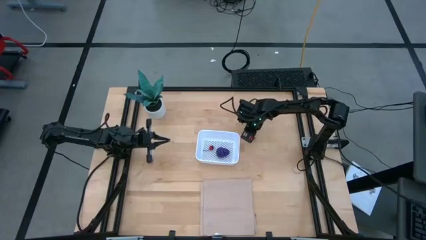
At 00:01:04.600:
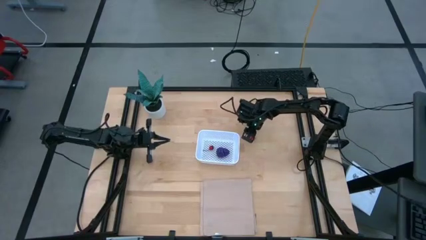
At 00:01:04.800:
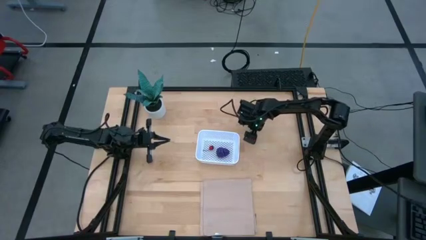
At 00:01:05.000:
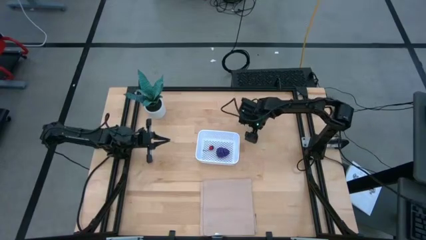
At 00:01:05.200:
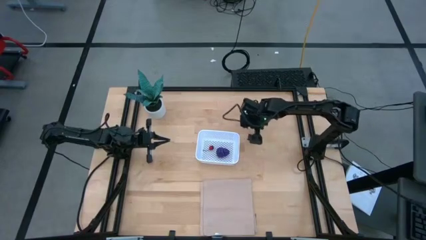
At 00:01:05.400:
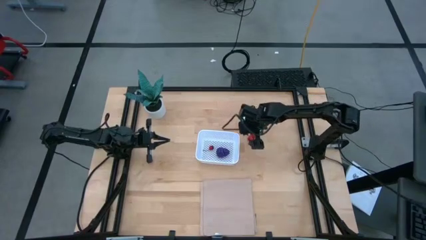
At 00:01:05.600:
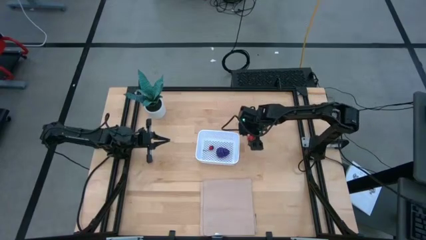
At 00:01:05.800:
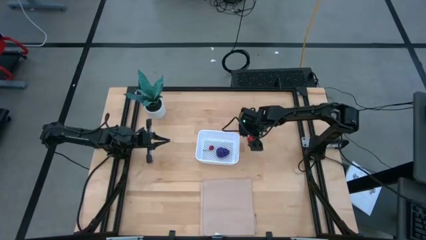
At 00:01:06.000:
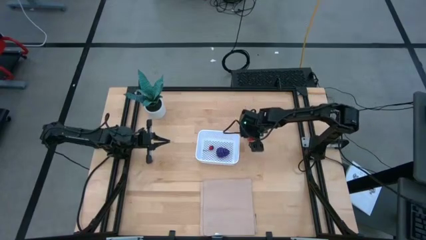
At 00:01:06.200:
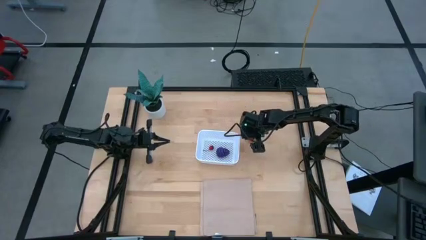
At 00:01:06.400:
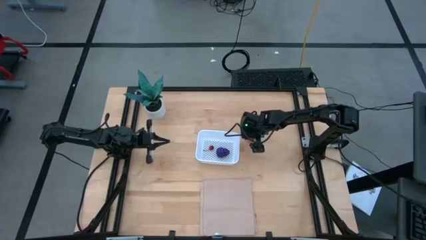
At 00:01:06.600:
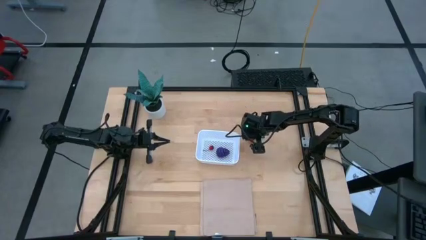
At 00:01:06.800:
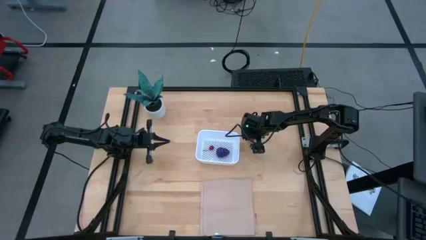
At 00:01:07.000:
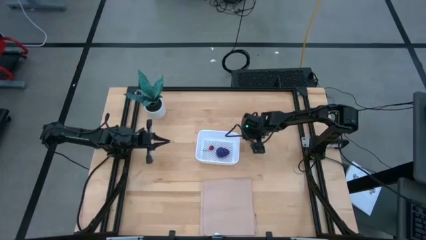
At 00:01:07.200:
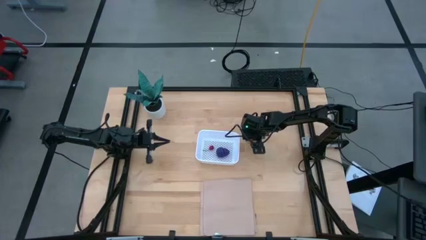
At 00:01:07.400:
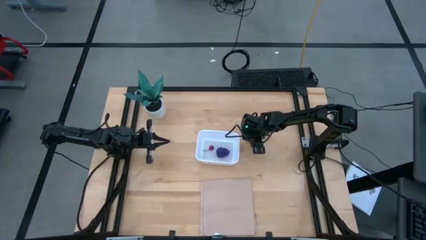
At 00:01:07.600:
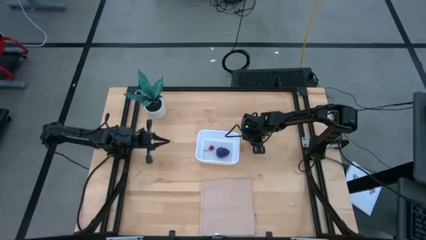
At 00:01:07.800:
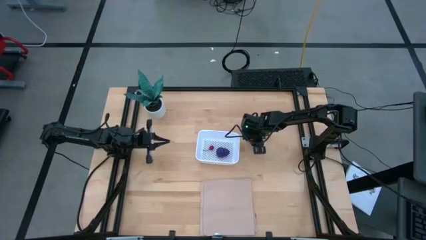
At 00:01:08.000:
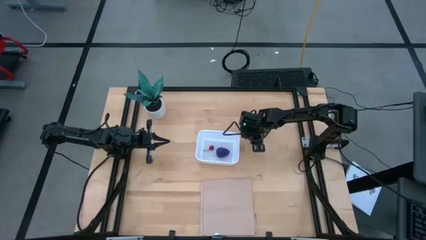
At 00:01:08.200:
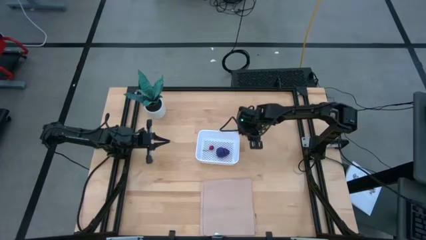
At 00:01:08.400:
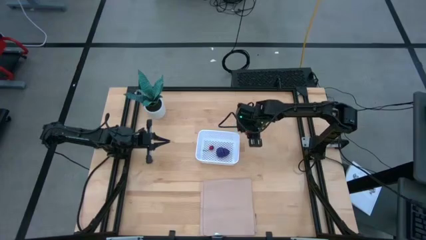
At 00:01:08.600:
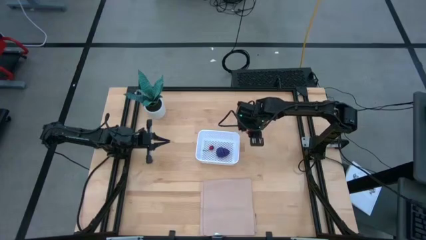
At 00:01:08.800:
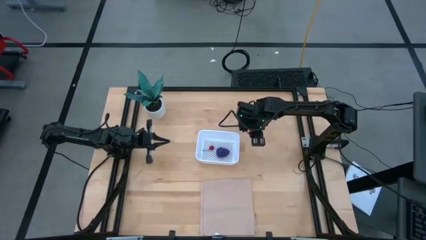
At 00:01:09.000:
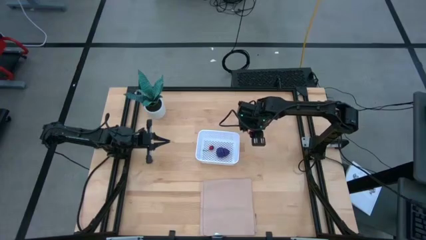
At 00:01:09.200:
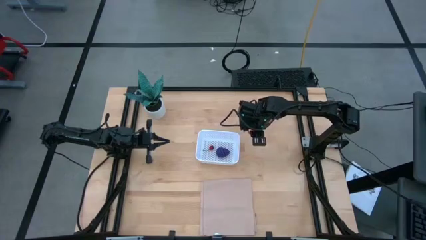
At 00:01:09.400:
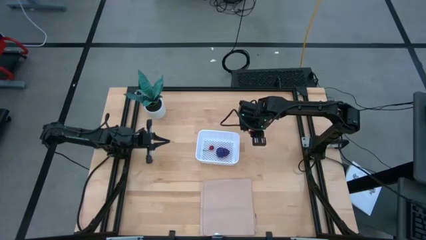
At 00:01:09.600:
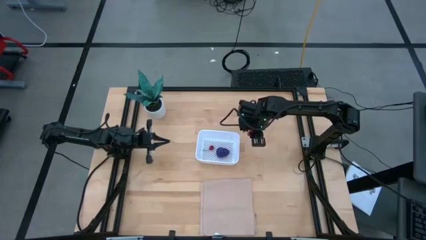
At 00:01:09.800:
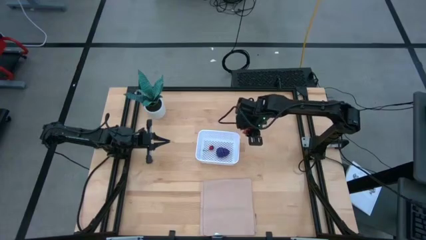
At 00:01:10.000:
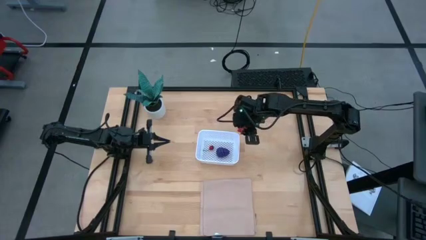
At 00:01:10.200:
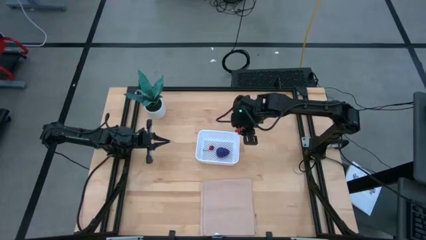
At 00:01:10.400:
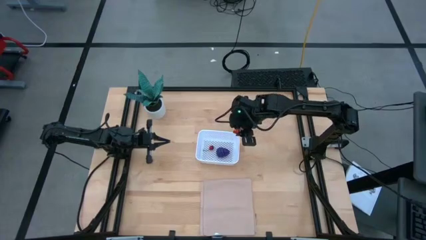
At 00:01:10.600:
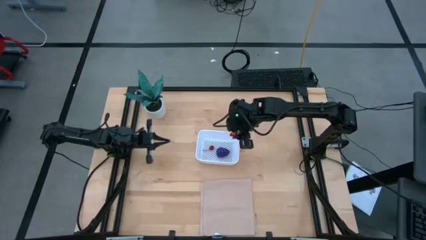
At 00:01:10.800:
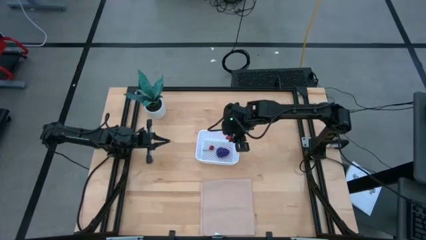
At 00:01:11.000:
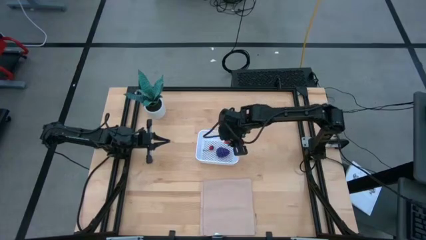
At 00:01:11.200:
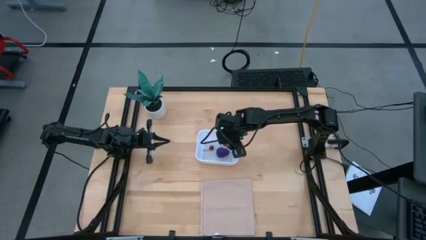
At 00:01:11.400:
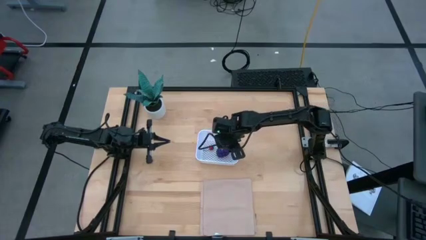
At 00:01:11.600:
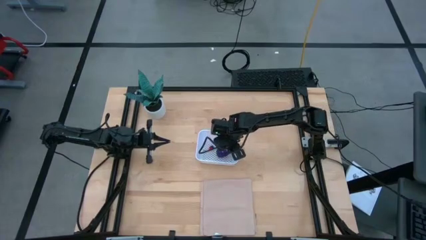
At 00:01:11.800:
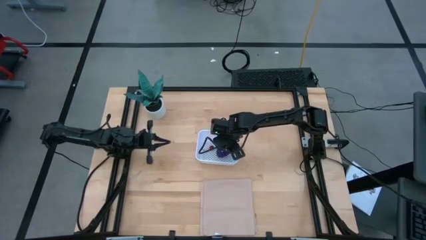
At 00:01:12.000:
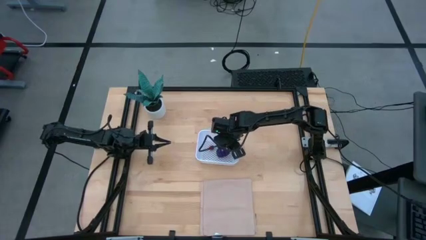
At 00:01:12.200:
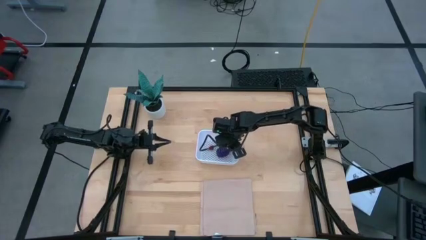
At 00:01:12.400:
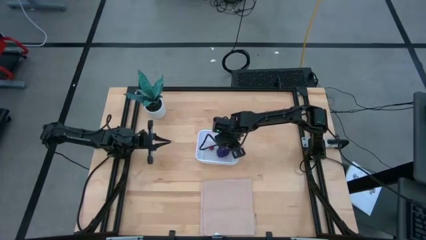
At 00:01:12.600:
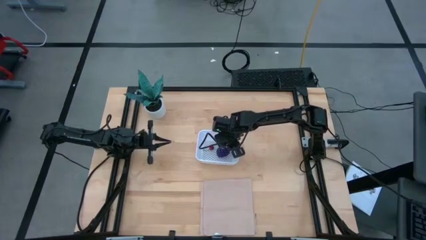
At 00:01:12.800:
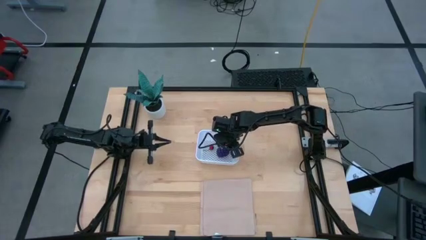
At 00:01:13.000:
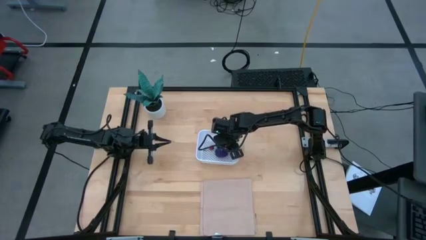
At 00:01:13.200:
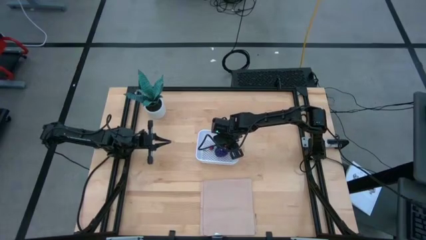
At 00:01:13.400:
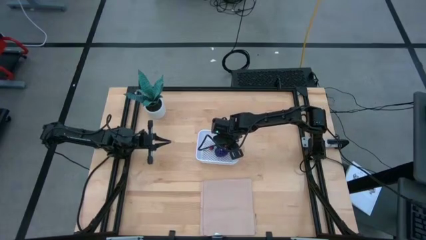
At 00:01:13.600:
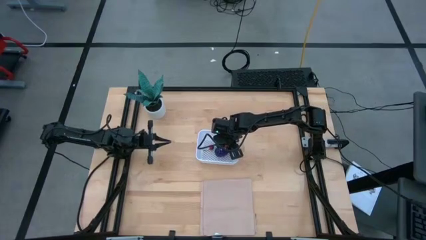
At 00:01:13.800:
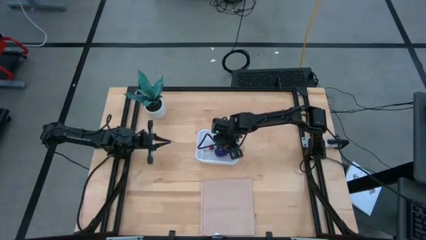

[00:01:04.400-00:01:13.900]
Task: Pick and placing Produce into tupperware
Put the red strawberry into the white bin

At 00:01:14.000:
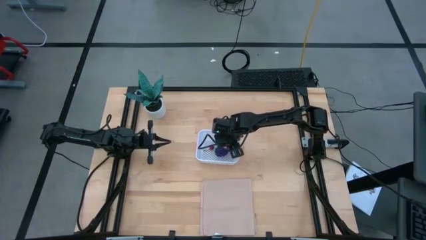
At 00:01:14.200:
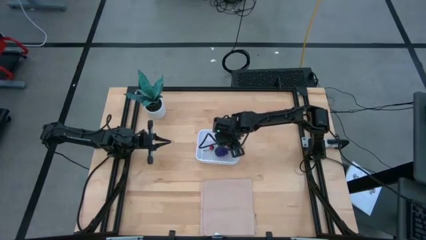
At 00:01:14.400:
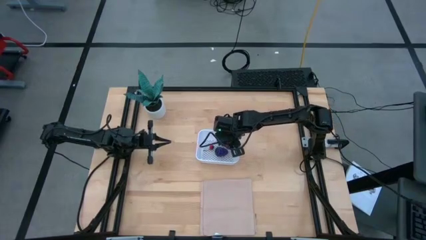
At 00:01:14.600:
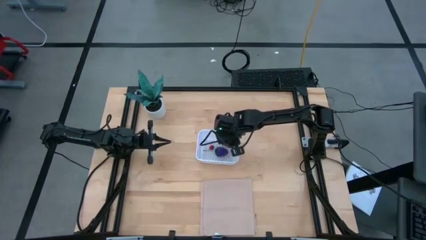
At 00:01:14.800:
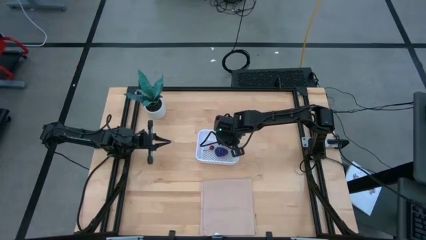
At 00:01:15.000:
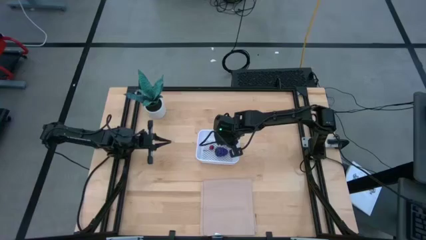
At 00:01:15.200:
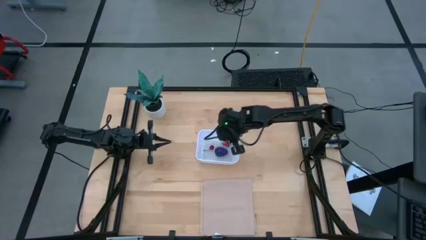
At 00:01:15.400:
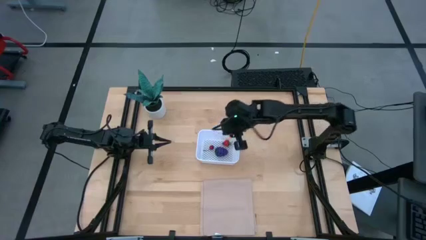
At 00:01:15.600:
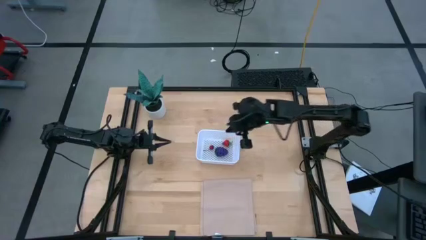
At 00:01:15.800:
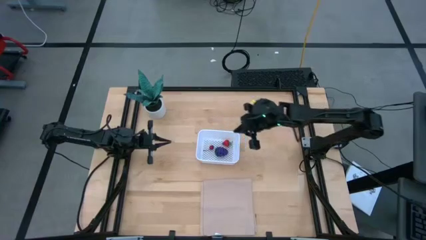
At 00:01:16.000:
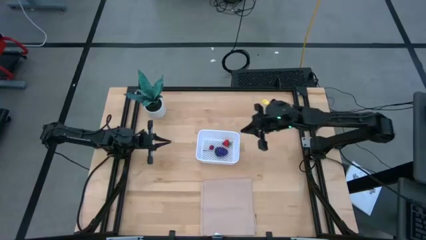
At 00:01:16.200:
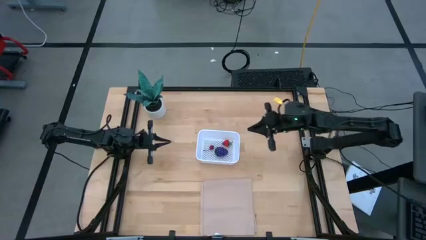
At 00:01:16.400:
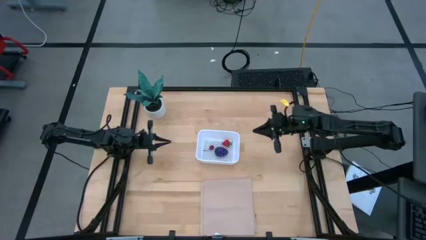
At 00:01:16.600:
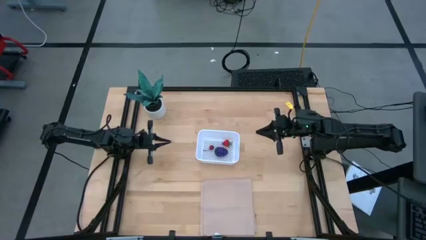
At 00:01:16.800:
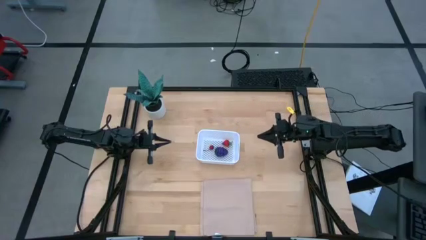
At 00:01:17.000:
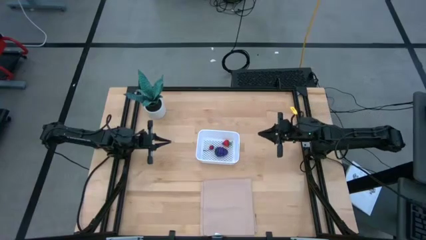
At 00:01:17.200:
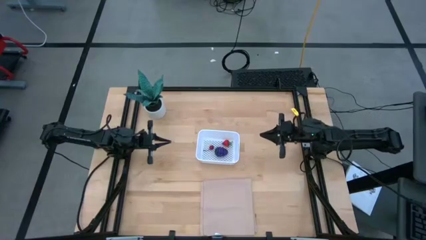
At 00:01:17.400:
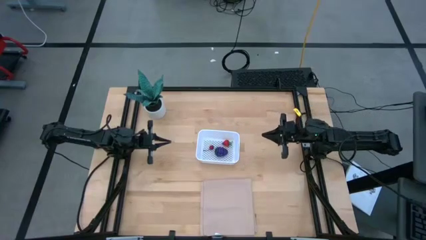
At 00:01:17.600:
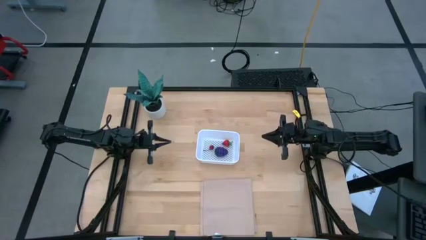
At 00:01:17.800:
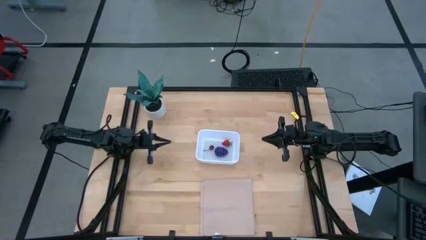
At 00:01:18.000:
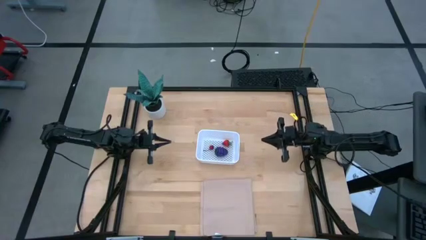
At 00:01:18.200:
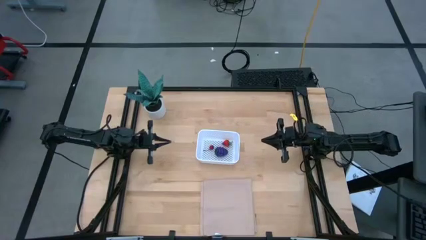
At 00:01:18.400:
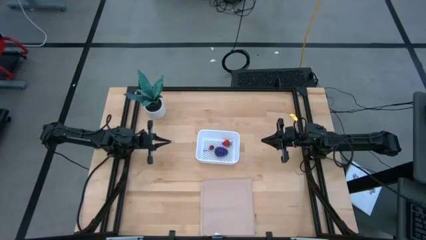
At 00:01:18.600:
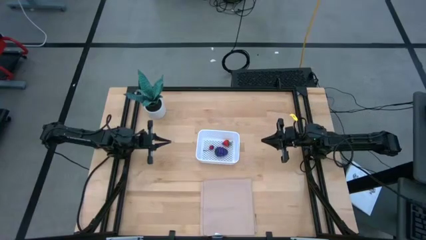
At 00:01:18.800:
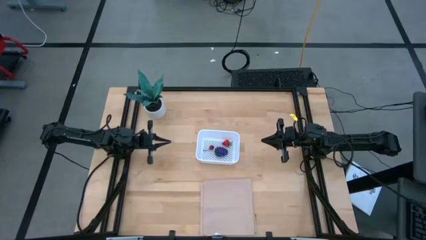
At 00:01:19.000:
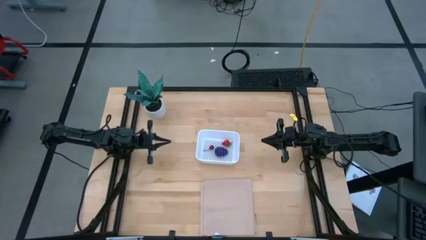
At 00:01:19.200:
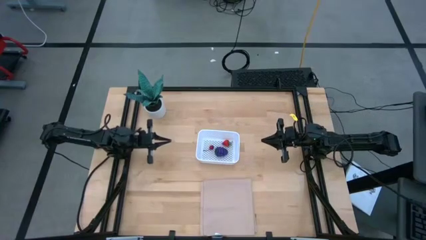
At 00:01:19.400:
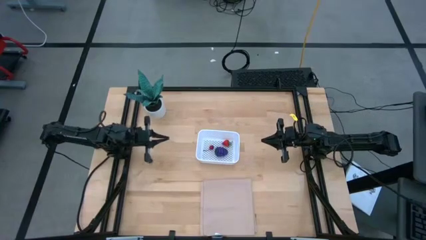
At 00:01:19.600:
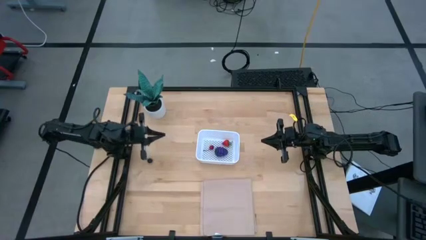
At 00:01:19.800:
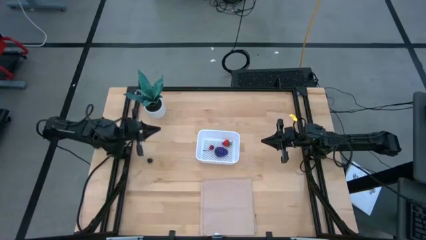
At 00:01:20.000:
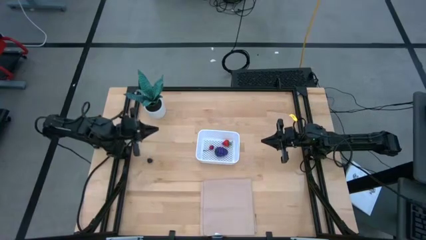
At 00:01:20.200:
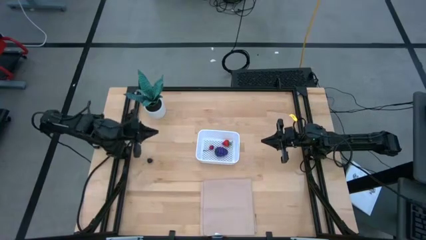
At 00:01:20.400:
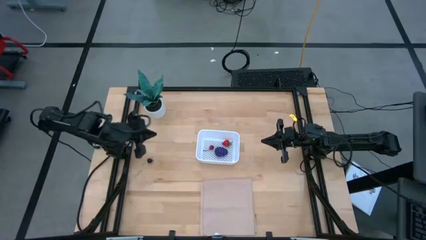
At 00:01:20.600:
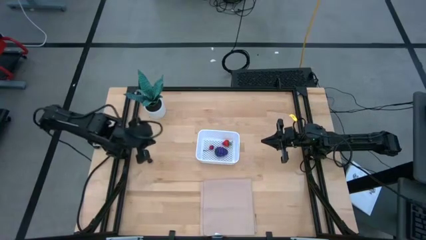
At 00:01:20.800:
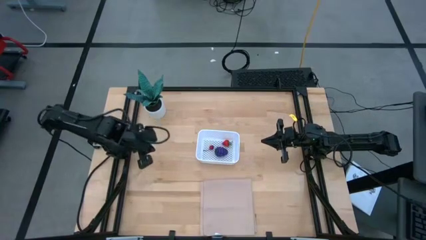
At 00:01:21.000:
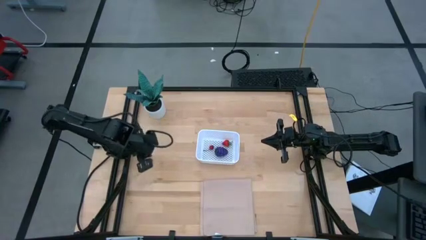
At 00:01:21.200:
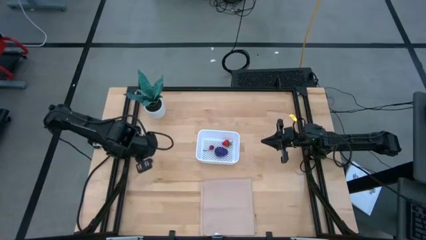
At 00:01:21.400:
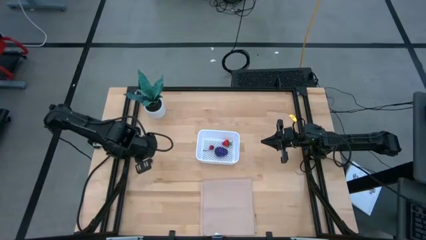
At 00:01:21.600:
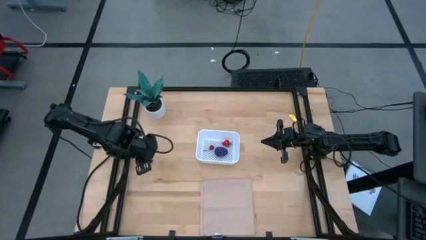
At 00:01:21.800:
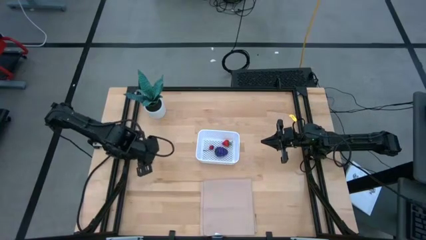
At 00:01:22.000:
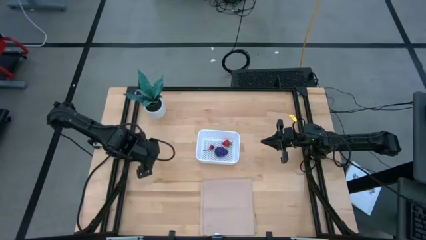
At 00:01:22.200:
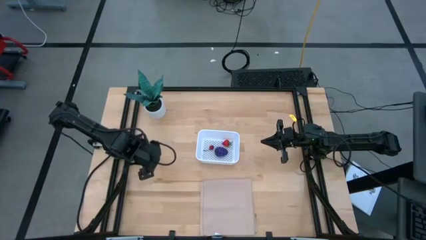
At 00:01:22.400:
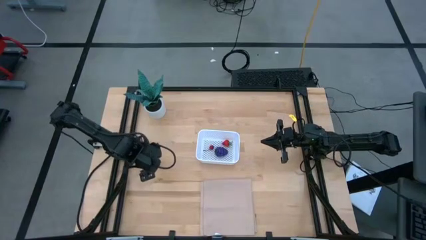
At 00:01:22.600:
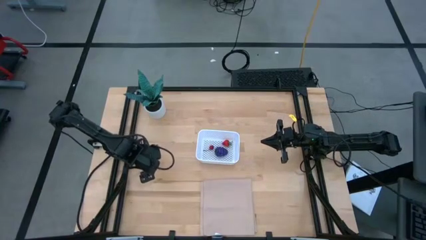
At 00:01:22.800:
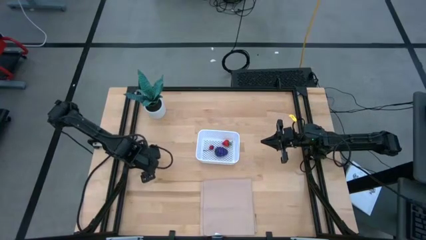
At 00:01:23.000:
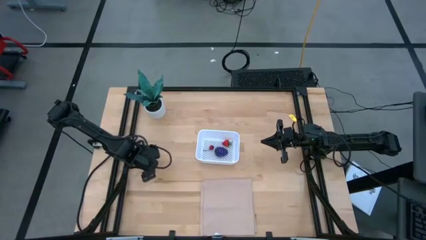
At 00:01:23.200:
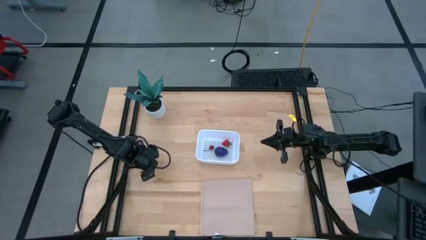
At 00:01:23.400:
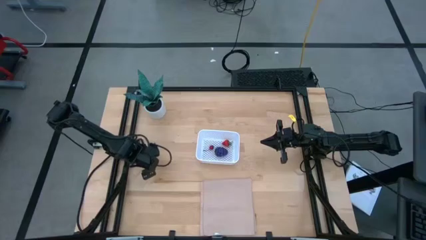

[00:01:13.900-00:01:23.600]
Put the black cherry into the white bin
